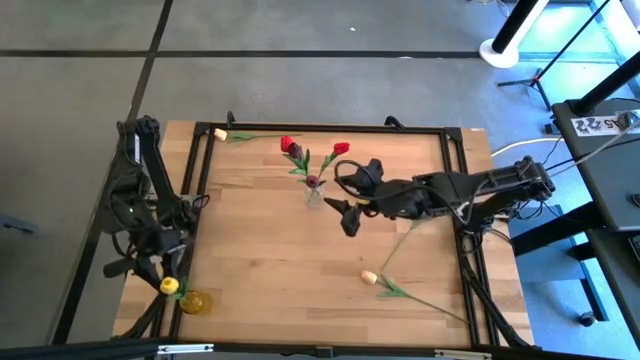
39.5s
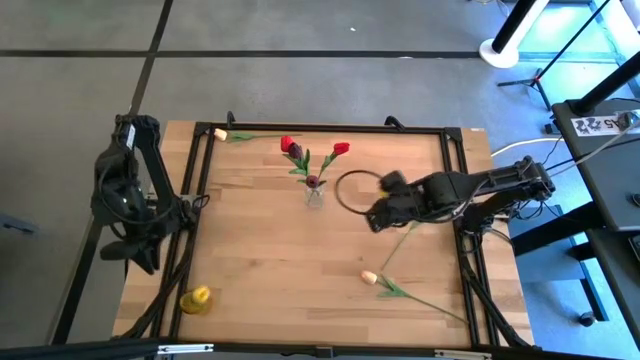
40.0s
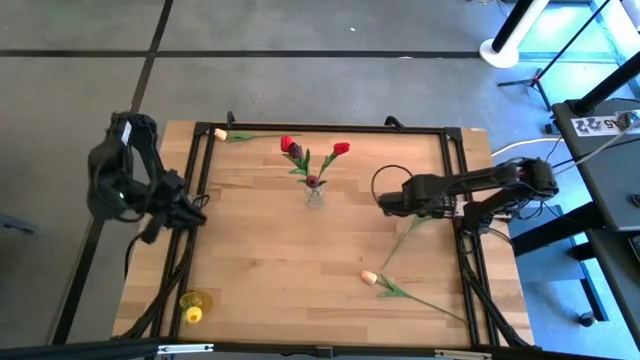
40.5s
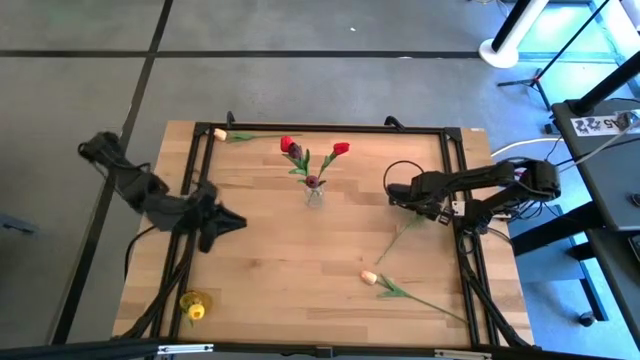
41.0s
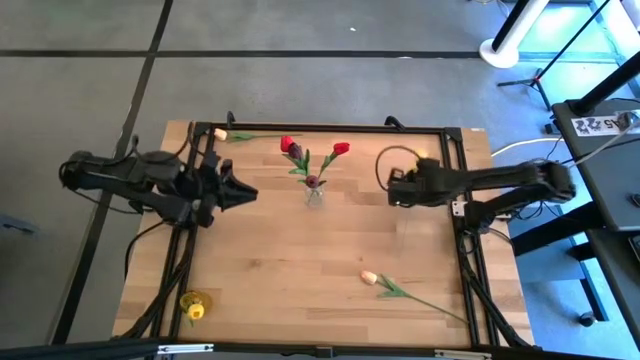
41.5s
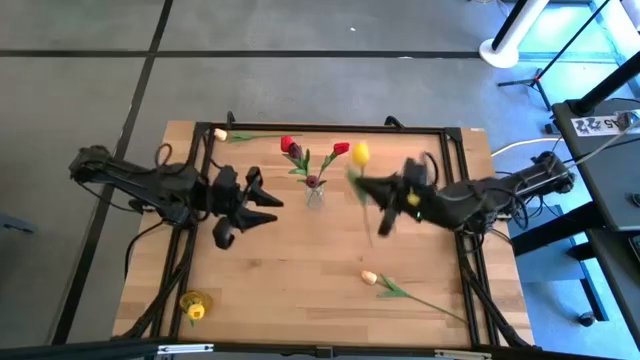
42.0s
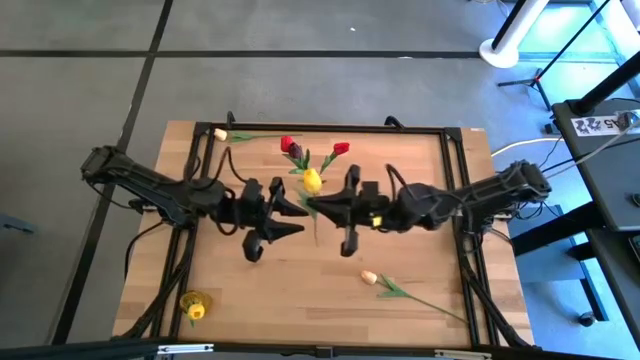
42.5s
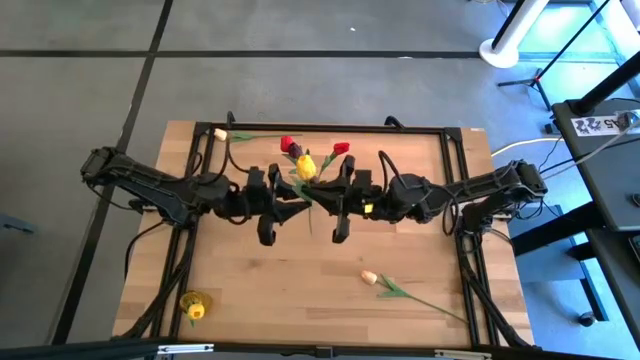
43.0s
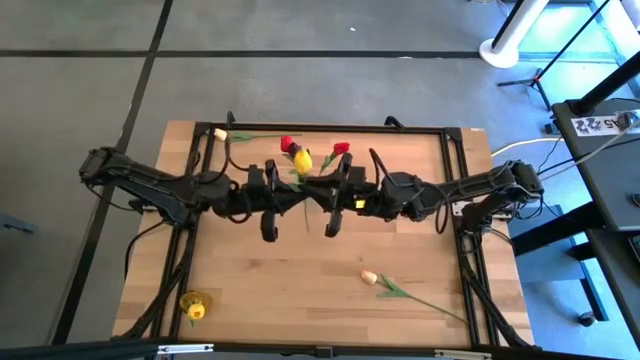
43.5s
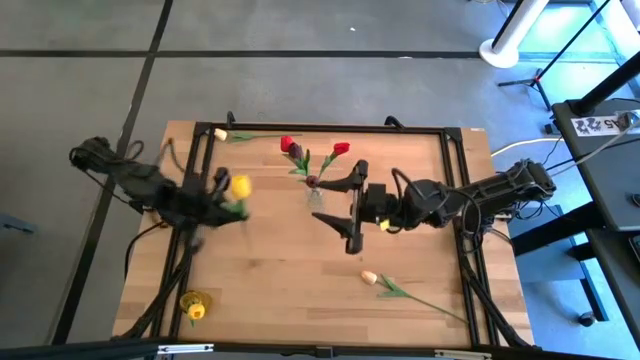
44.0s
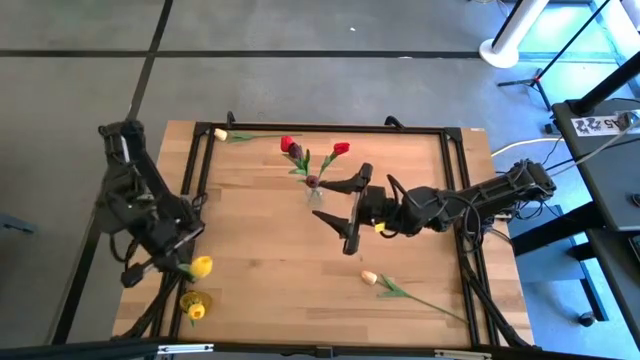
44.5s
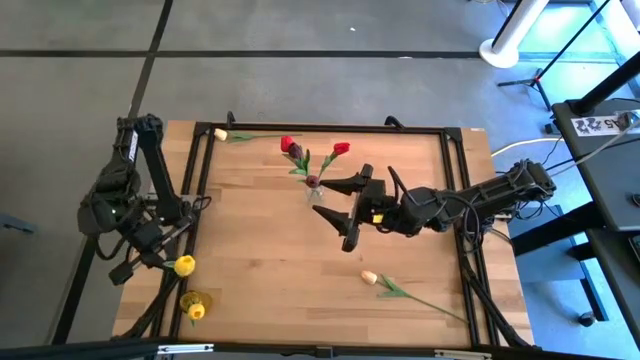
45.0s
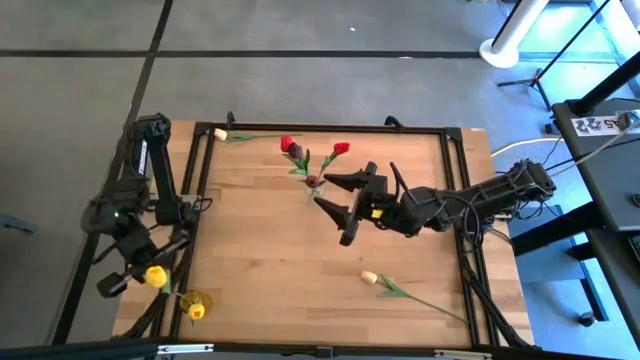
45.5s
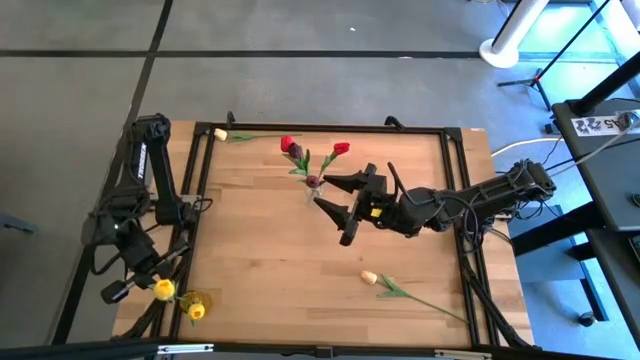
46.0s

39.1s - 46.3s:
Task: Sort flowers into vase by color
Put the yellow flower into the yellow vase

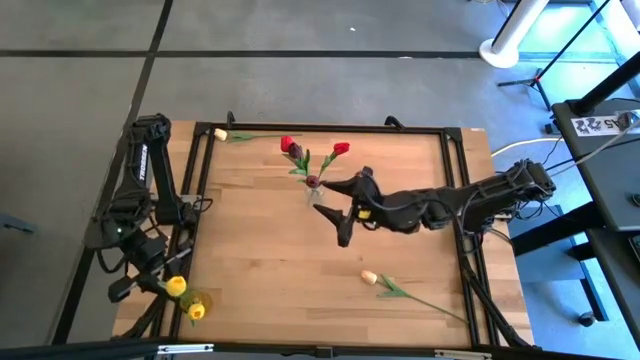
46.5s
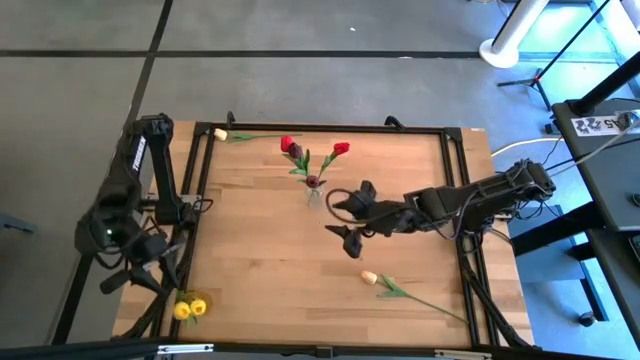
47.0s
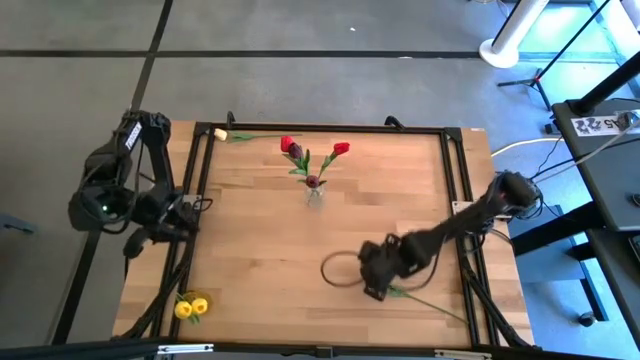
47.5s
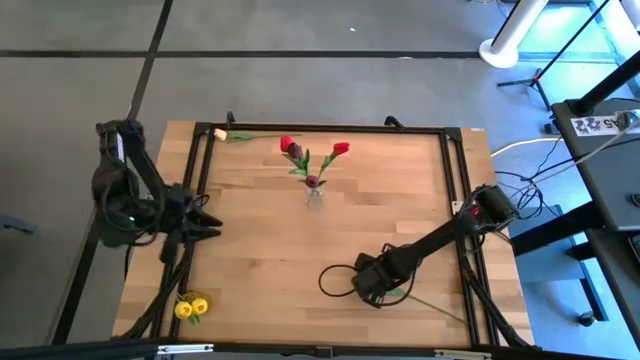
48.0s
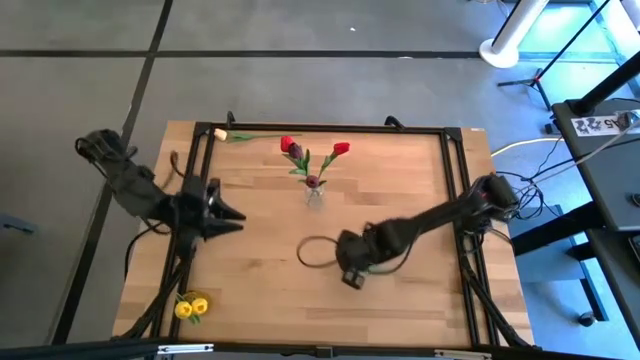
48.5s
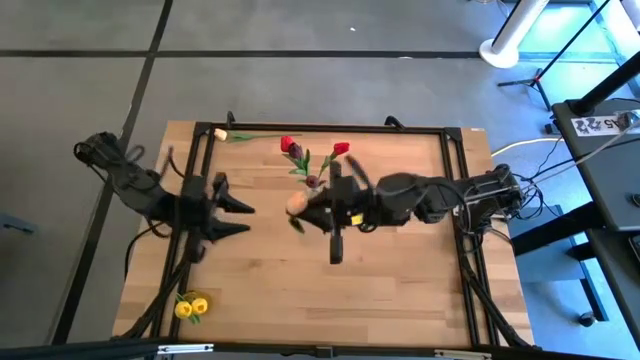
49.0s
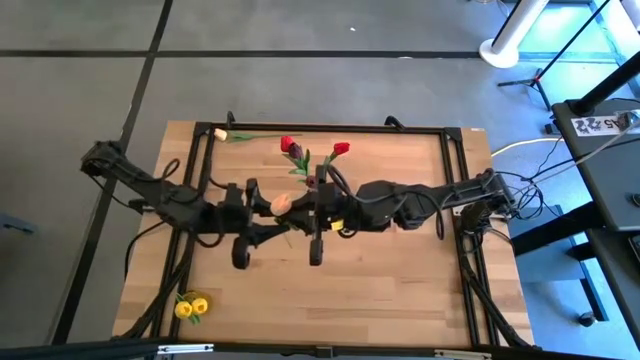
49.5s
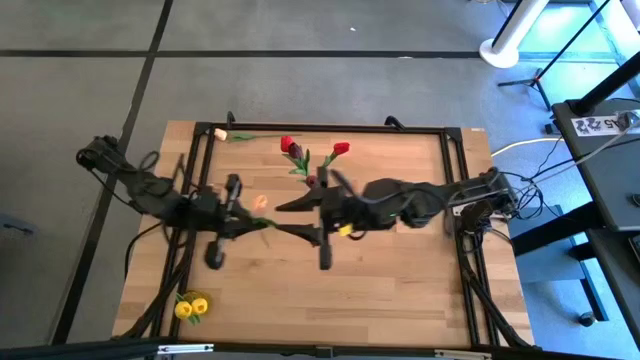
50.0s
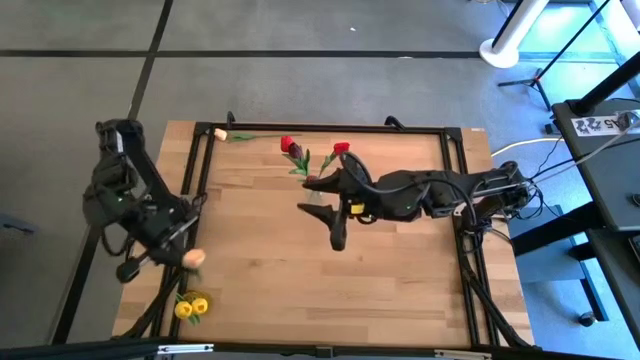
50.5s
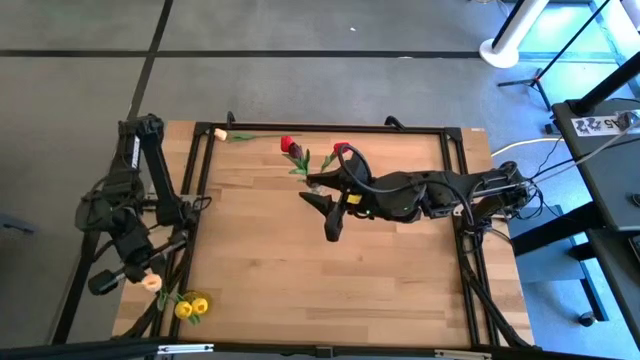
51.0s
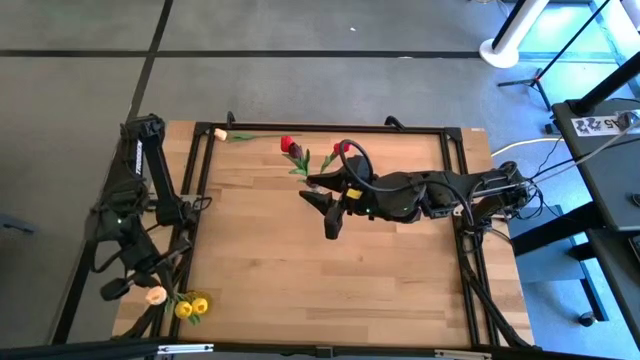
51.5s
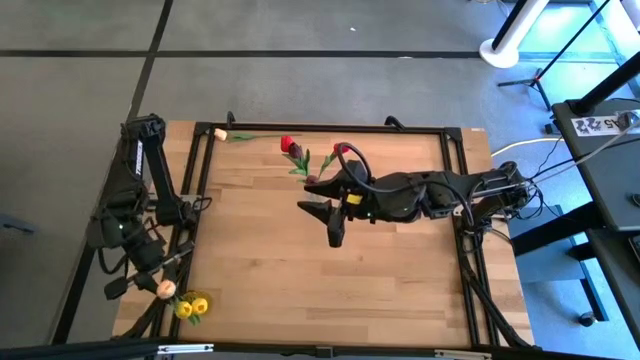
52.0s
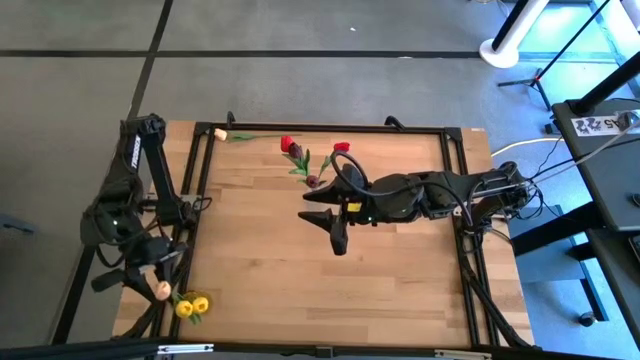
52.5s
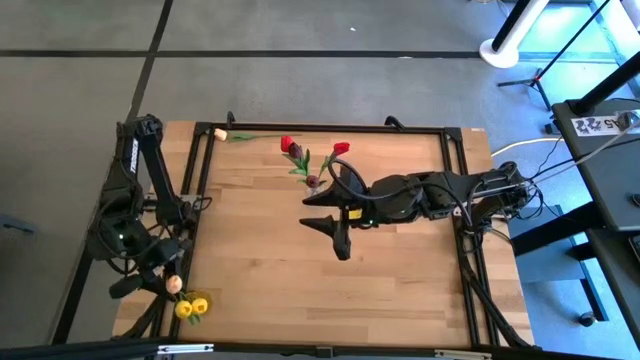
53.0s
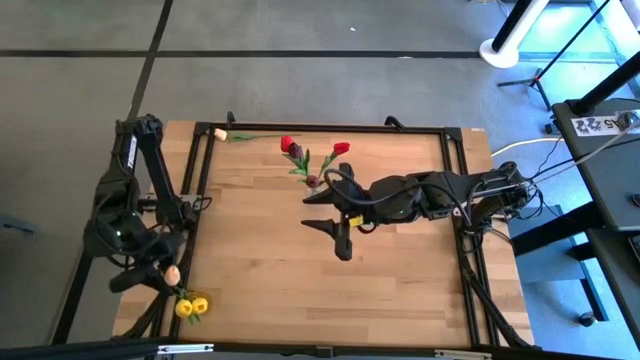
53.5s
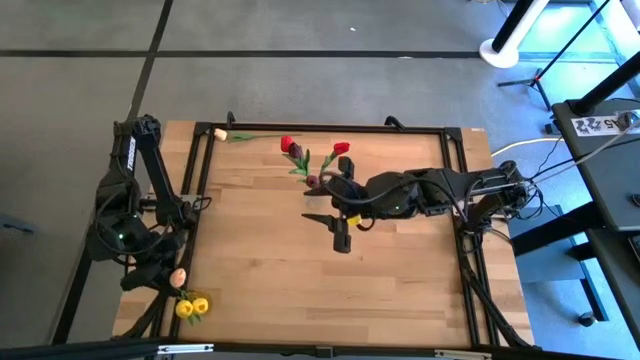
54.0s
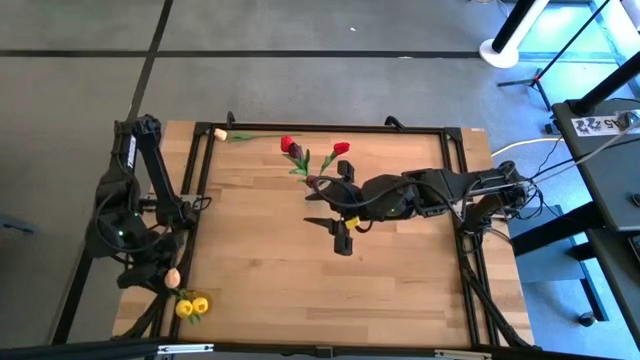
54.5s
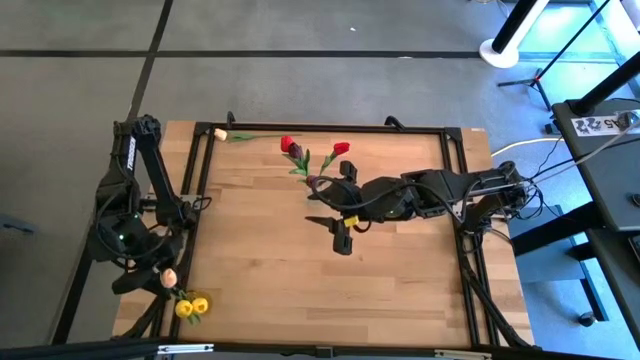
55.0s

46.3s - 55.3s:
Put the bottom white flower into the yellow vase

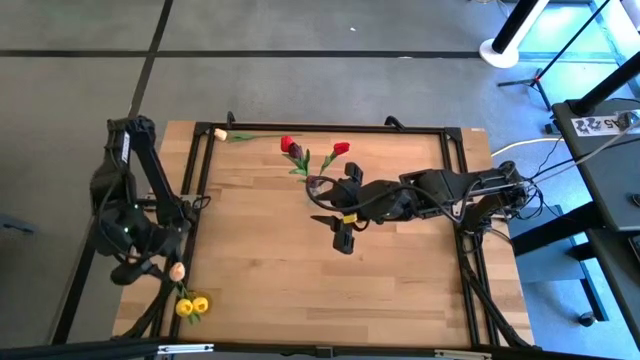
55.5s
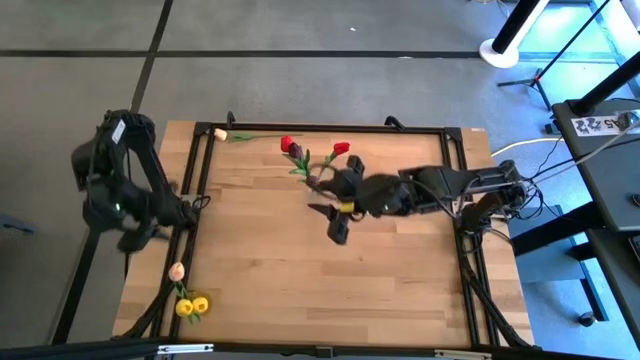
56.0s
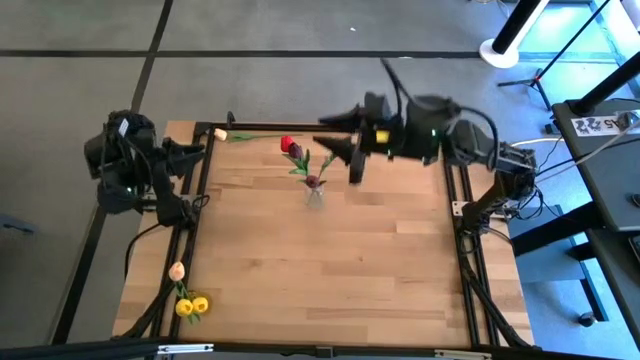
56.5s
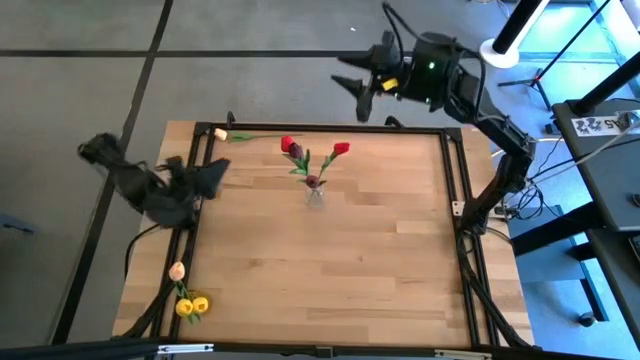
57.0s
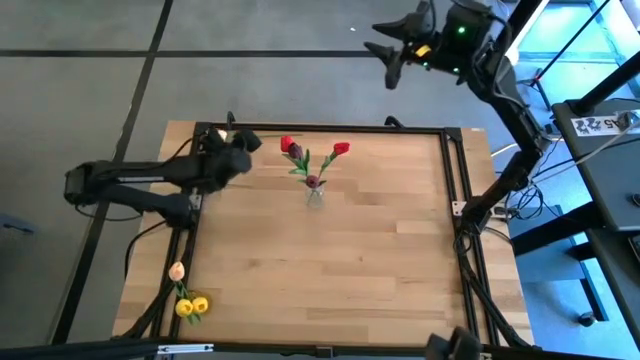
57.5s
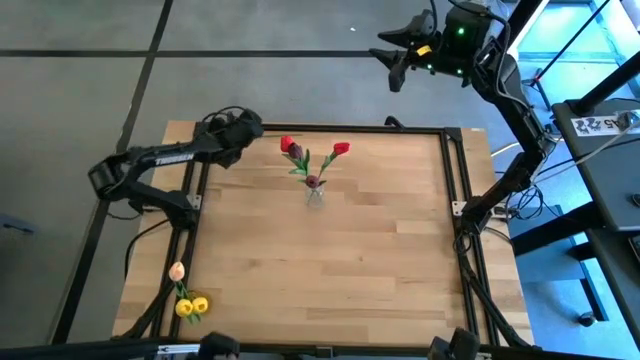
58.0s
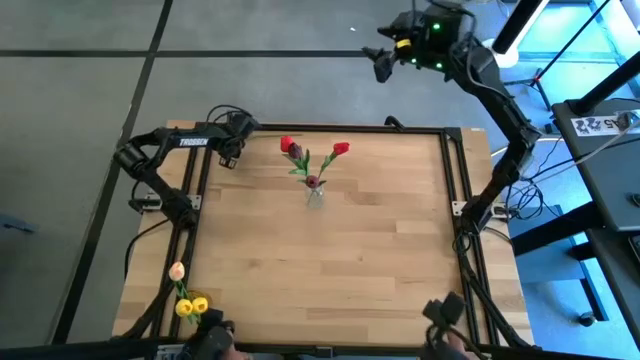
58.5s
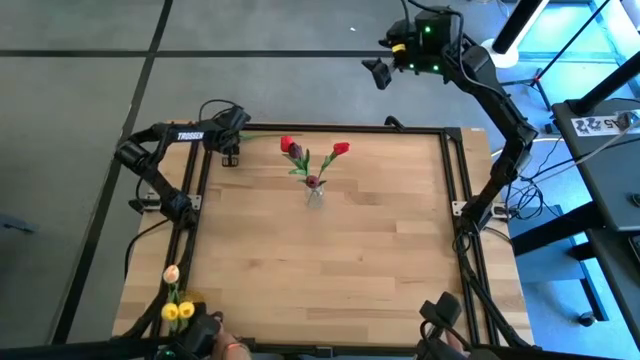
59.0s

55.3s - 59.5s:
Put the white flower into the yellow vase

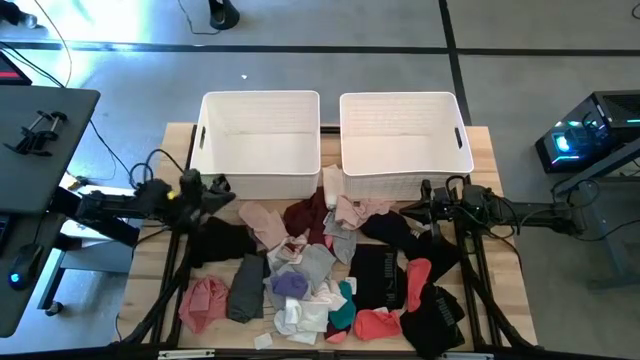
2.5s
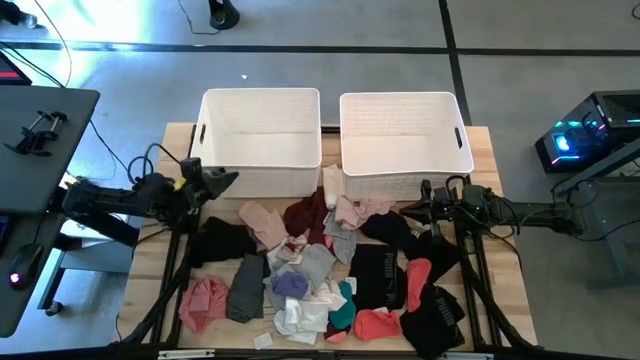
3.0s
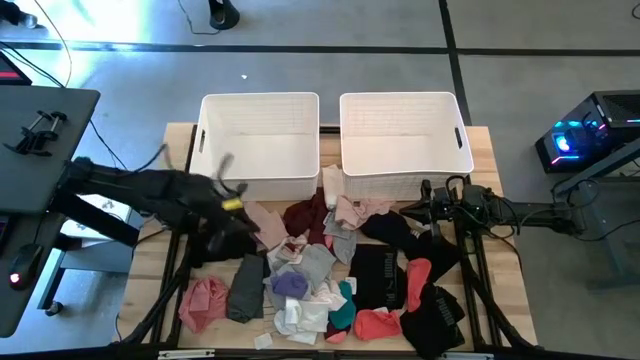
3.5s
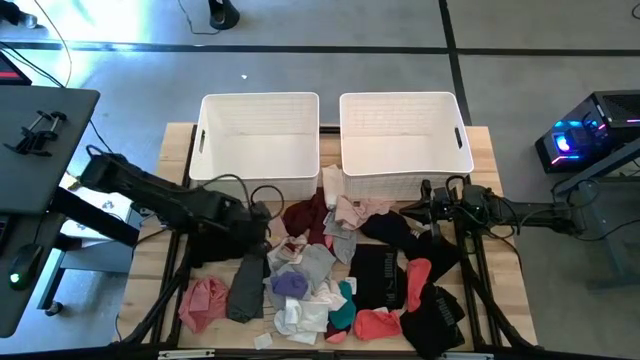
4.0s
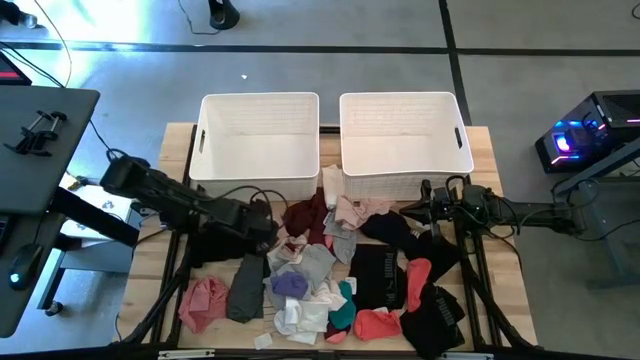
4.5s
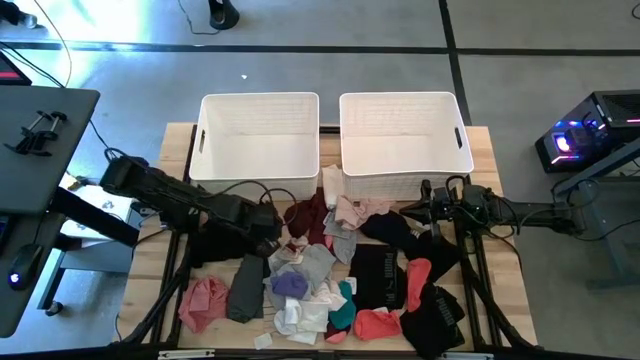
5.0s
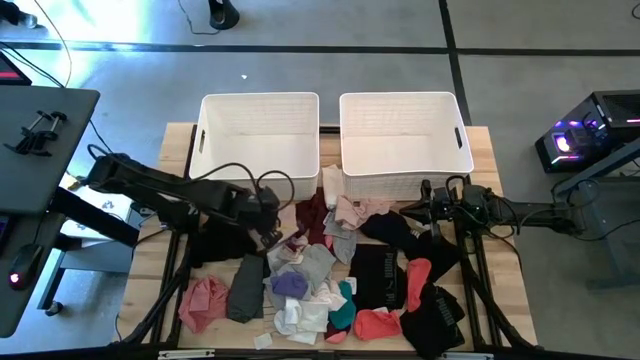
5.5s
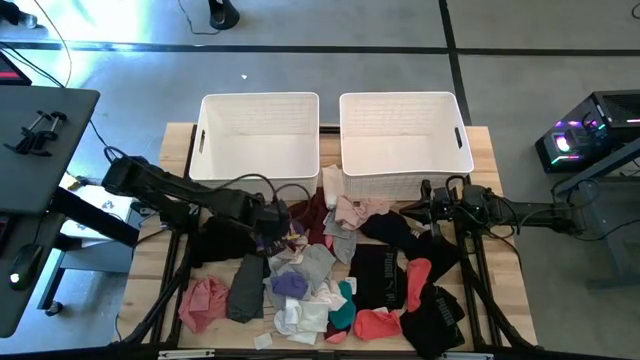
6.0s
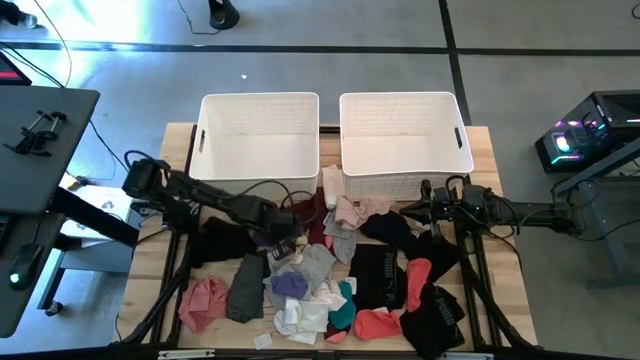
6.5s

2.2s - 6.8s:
Task: Sort clothes
Put the pink sock into the left white laundry bin
